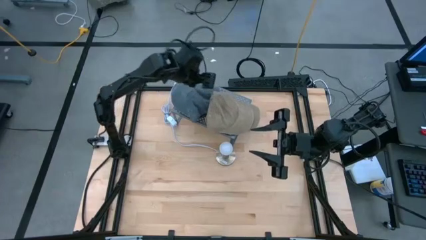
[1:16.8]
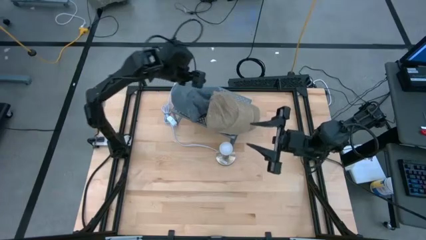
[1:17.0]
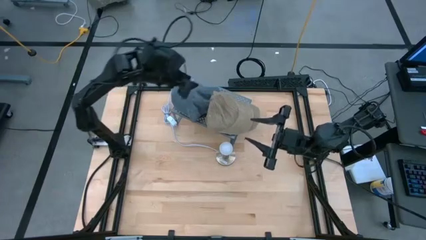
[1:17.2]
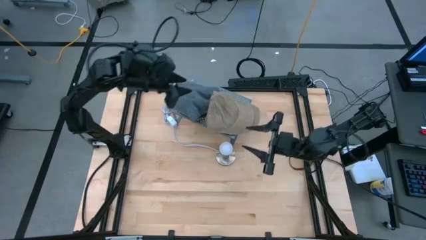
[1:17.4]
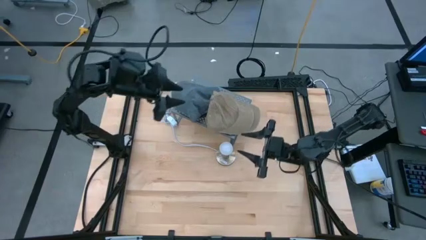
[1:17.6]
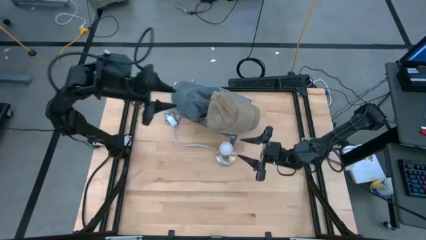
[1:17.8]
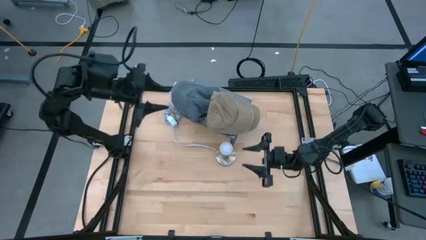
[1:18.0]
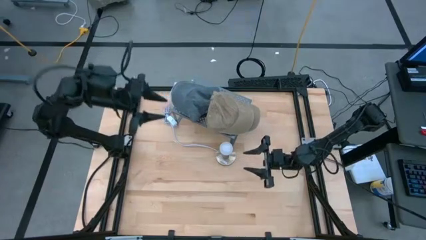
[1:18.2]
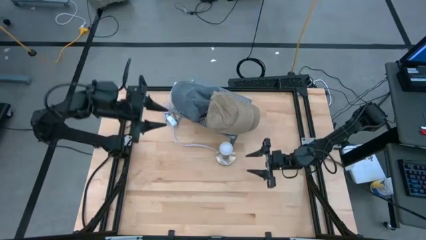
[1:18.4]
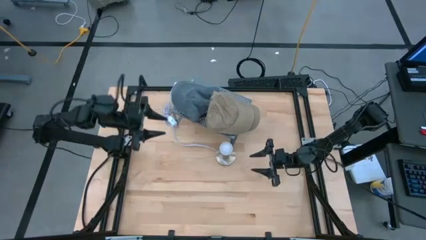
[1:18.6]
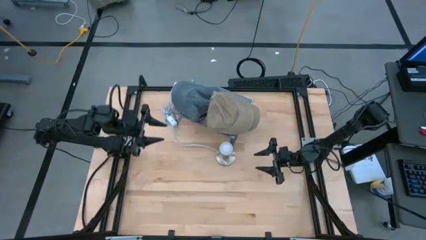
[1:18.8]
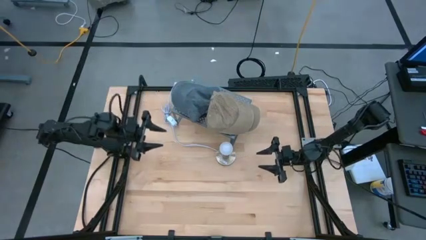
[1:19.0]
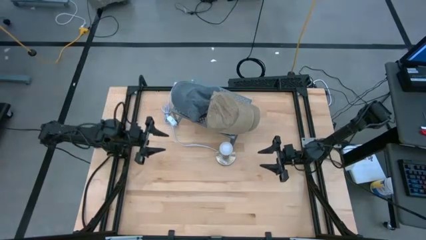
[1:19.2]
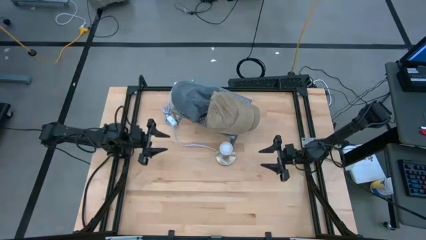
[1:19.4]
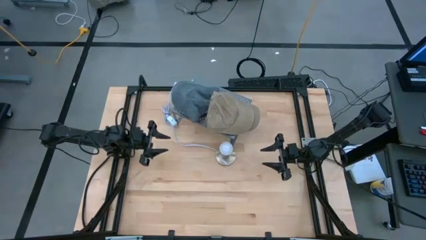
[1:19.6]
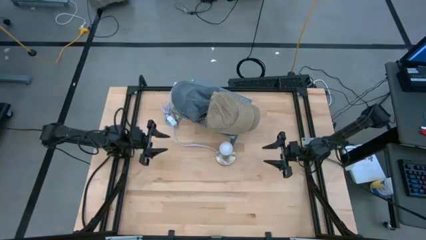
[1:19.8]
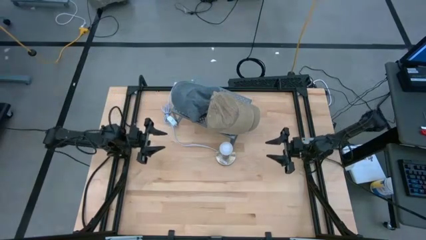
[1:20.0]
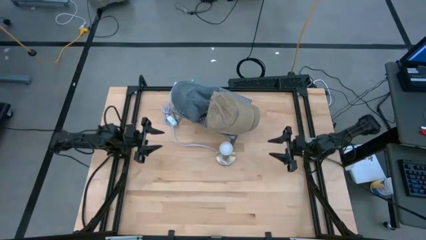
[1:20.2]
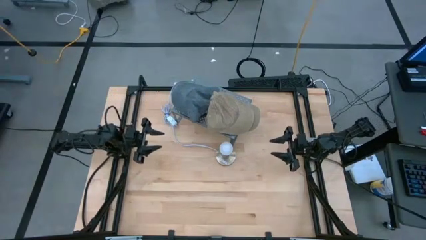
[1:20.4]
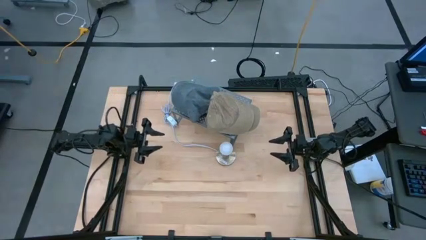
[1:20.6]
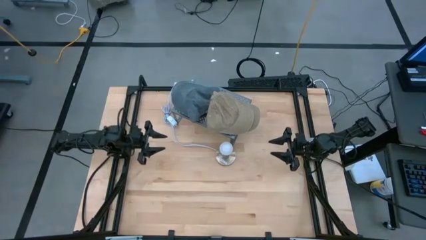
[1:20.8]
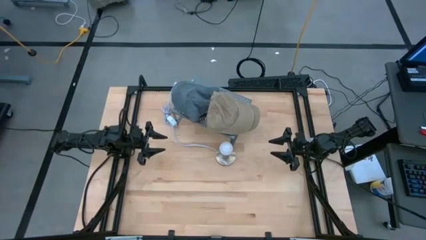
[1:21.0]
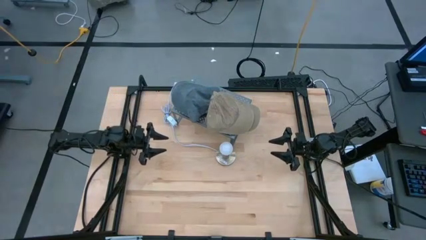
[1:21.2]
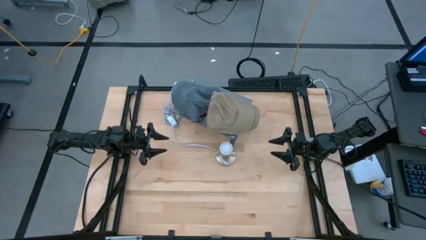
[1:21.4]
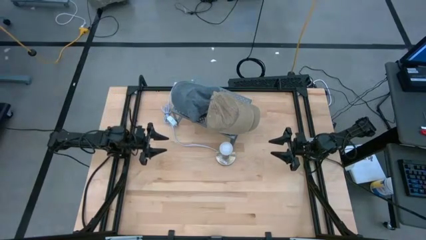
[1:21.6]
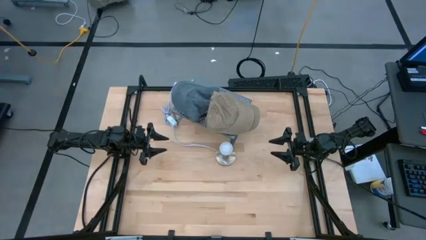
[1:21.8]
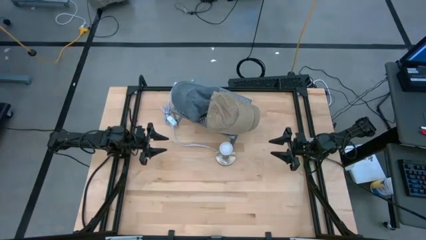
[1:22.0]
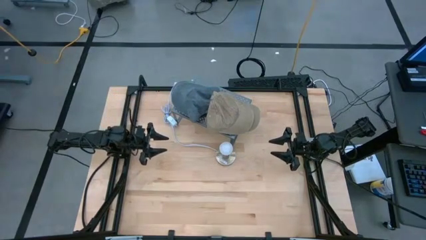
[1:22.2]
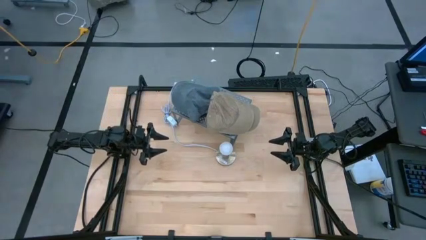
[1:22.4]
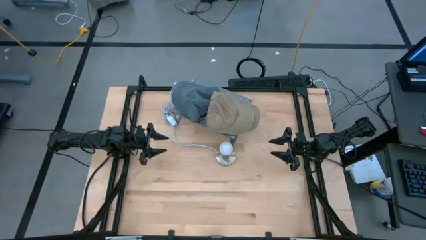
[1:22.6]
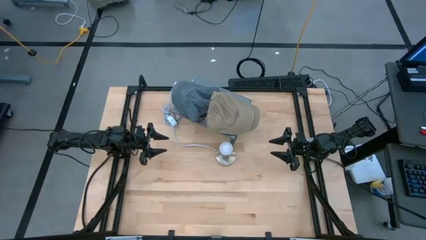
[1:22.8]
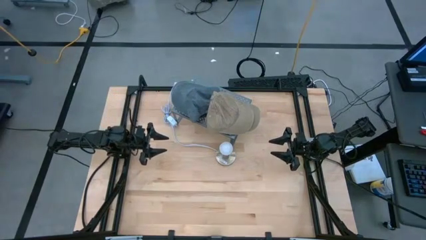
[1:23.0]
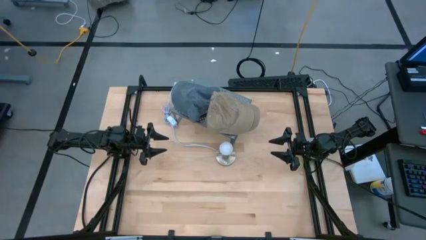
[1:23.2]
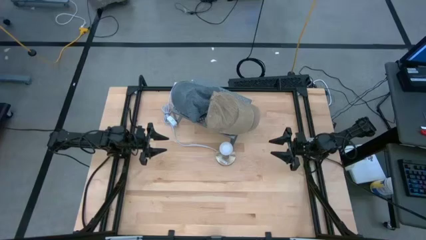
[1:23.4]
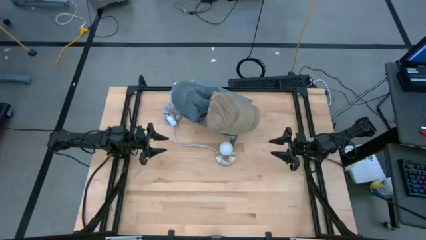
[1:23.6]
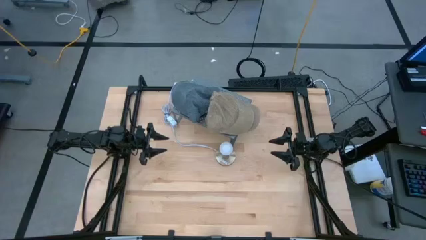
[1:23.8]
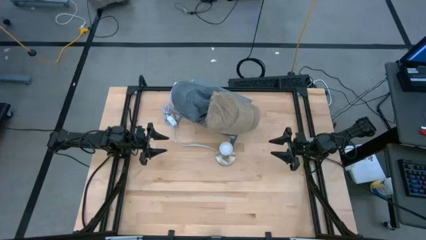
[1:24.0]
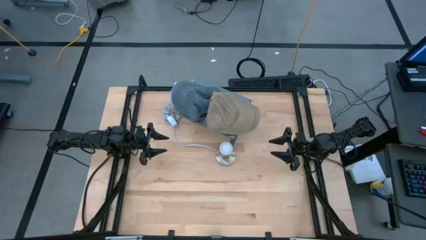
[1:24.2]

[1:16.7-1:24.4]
Task: Pick & Place hat
Return to Home Position

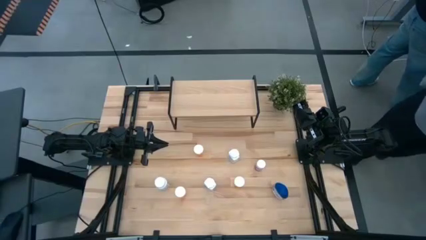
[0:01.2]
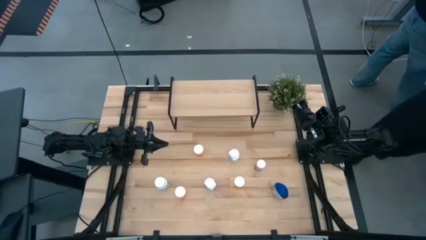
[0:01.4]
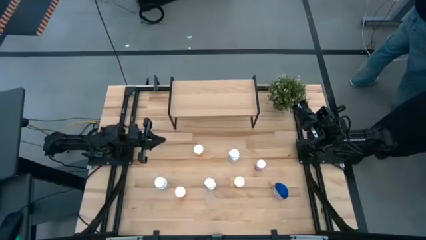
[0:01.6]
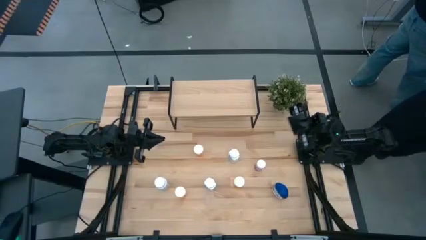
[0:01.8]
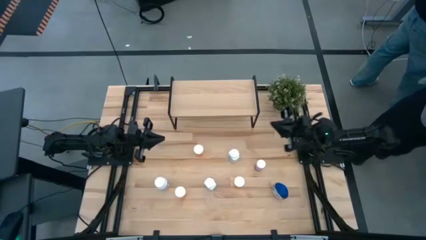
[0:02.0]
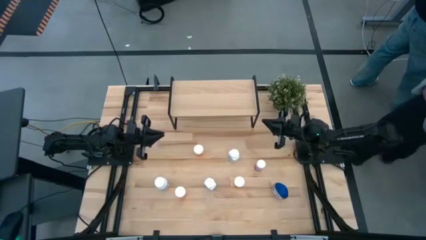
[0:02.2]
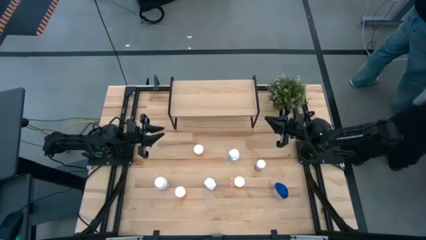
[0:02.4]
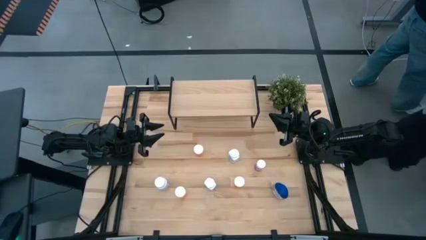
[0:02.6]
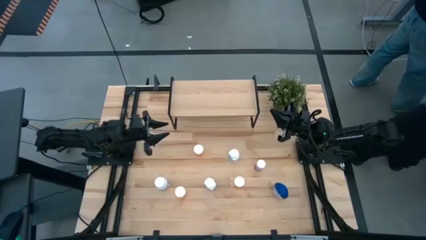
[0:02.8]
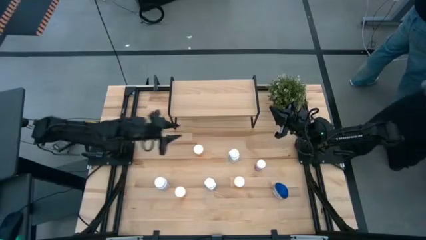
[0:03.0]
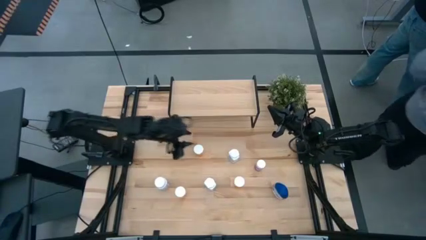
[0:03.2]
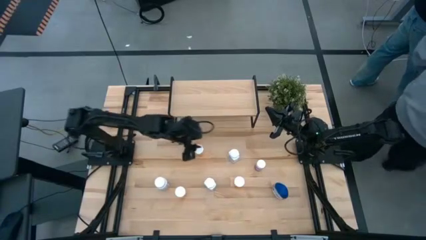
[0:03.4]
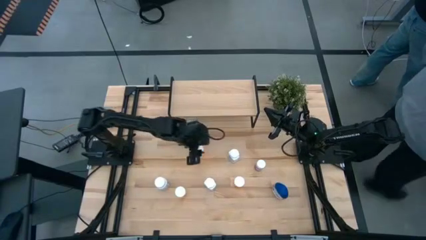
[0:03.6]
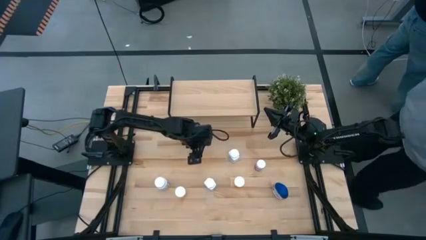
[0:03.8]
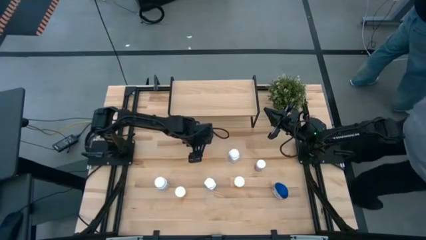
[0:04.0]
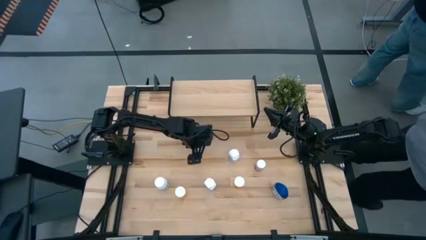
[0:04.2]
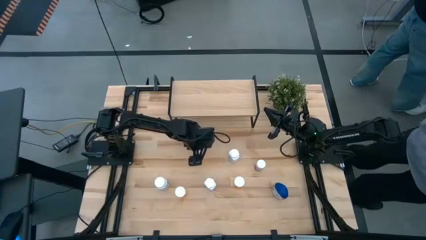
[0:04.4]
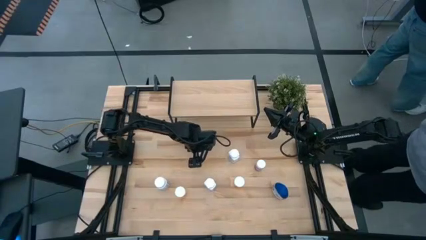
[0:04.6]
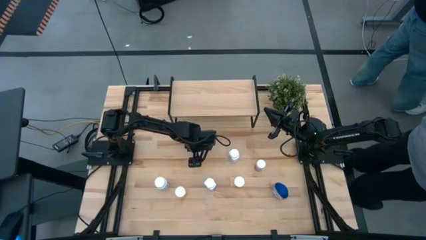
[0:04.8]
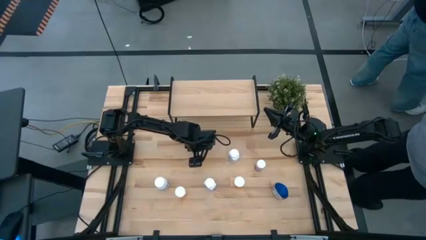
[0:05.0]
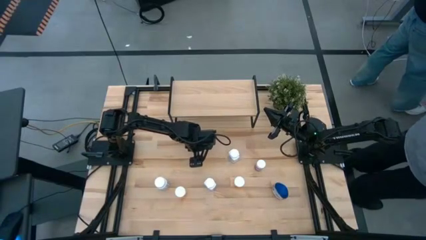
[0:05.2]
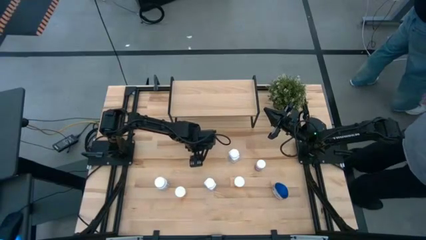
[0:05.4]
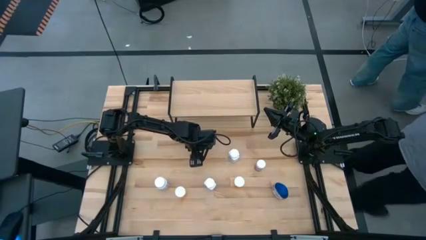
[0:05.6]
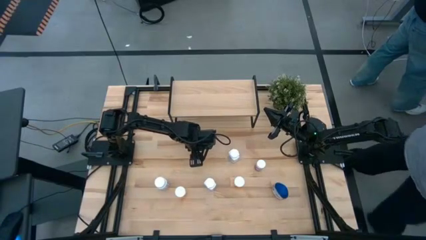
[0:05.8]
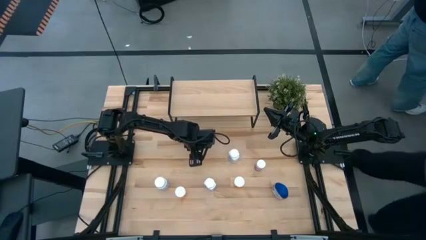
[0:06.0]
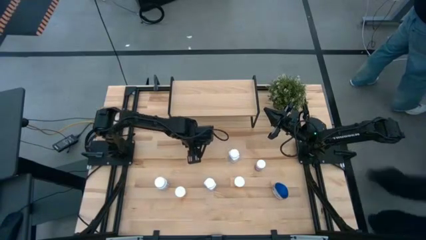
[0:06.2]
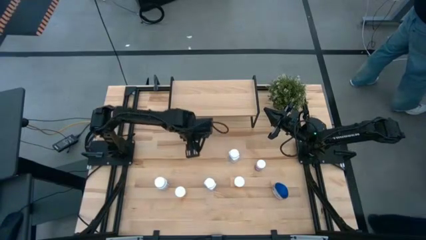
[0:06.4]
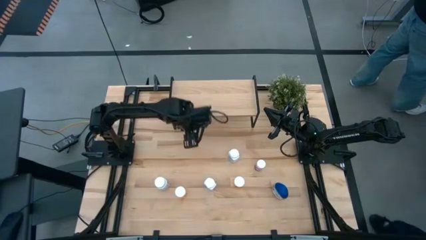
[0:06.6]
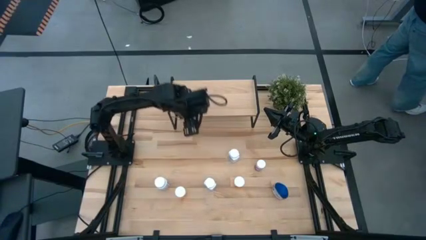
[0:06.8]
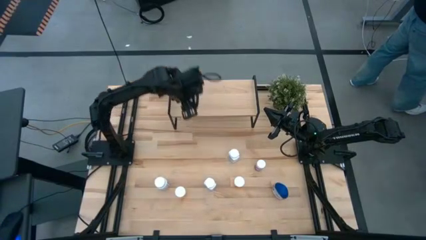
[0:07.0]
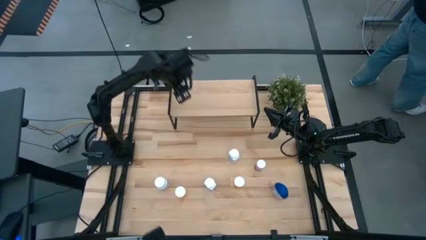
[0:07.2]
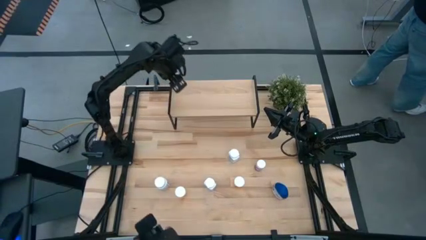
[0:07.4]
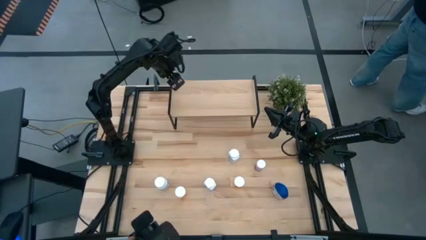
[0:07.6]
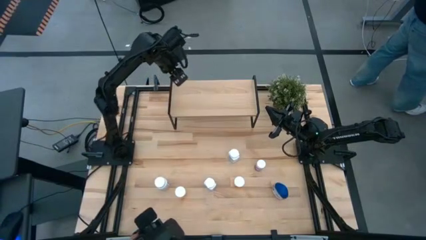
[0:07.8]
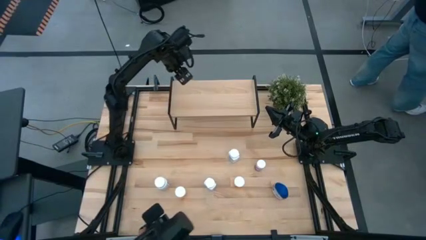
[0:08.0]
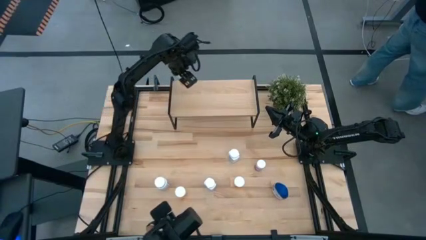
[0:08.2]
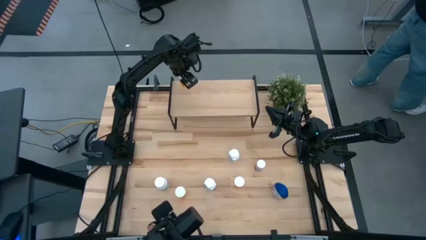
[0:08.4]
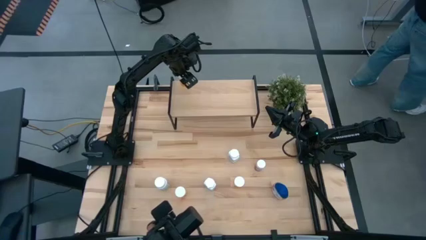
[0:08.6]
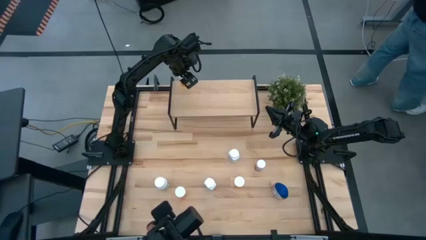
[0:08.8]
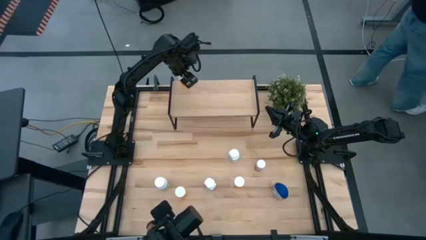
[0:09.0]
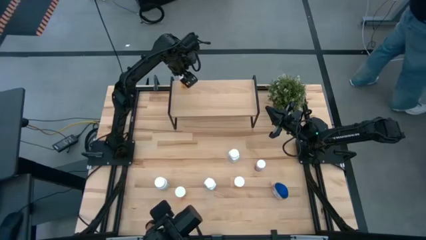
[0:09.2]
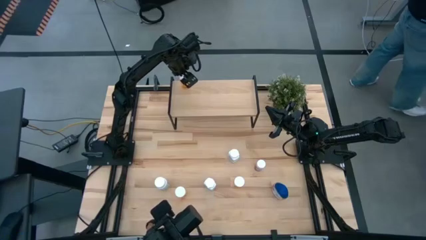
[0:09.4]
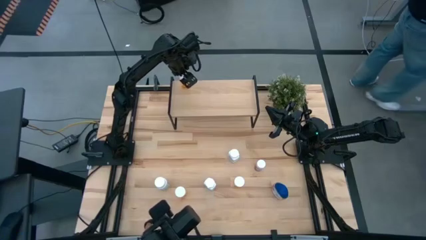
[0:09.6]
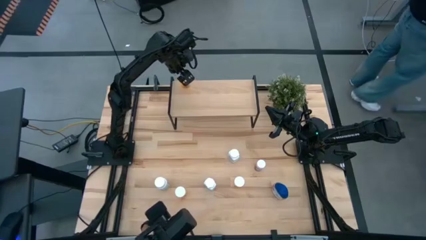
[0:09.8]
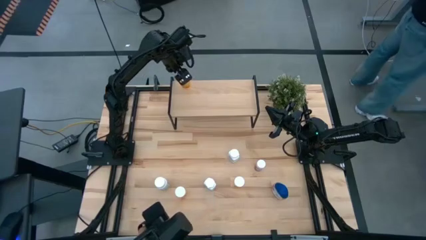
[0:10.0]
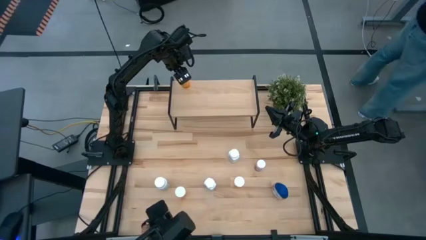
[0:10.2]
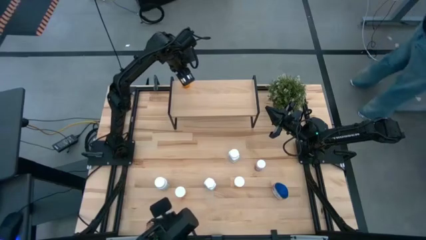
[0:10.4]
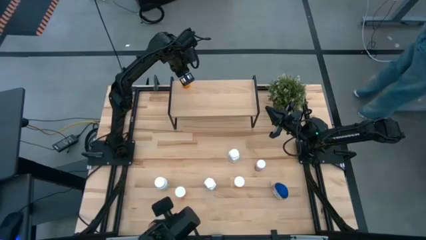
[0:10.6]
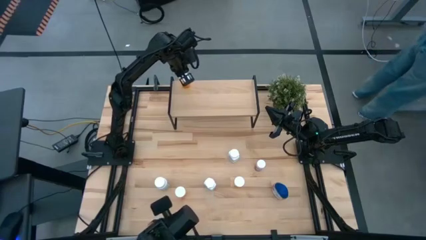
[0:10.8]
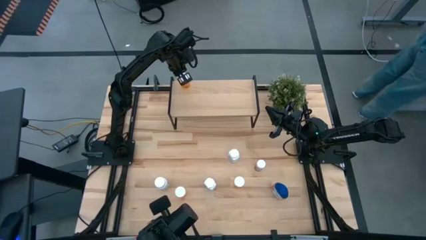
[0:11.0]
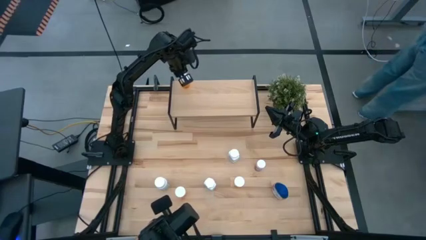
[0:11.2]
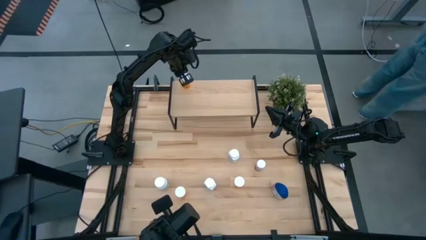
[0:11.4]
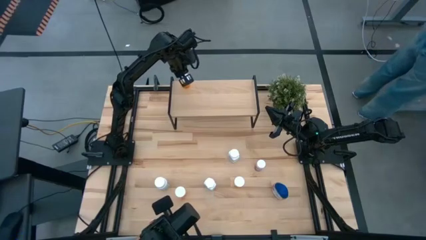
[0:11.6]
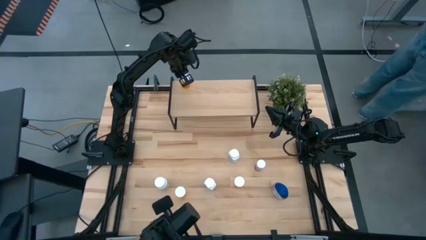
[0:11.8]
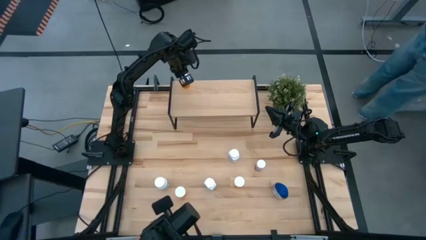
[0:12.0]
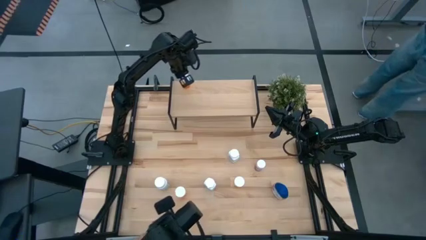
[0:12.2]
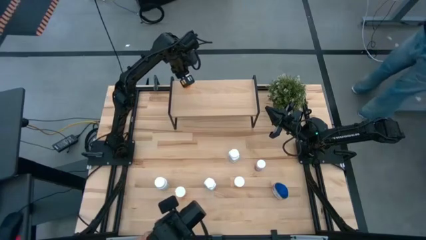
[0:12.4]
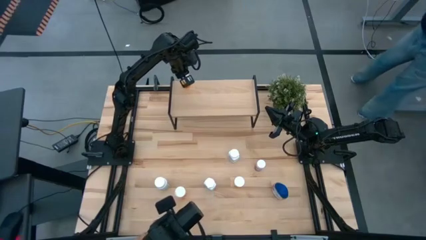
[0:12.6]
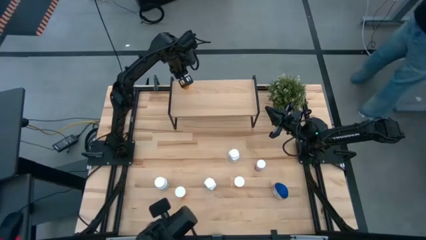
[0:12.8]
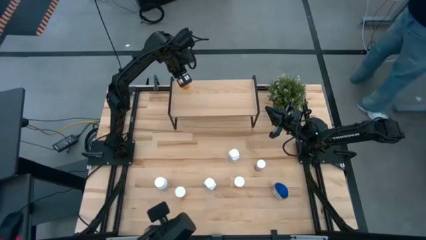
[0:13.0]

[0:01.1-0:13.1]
Task: Pick and place medicine bottles onto shelf by color
Put the top yellow pill bottle on the shelf
